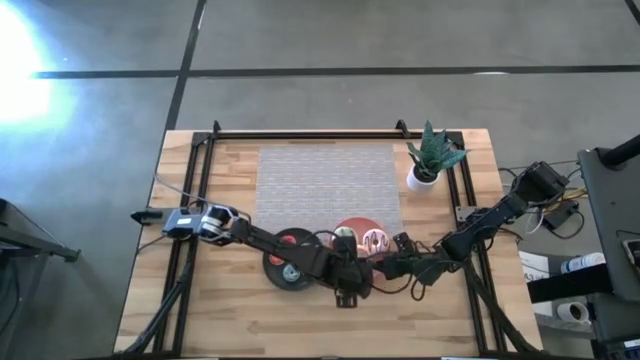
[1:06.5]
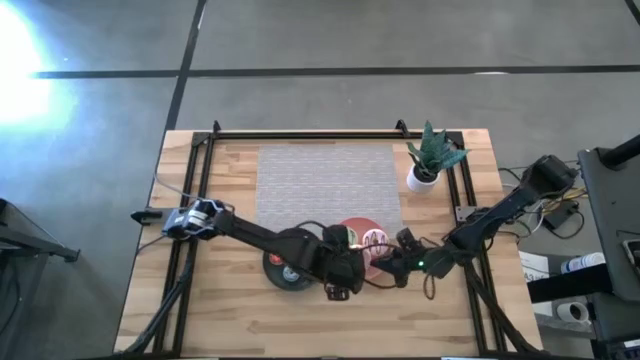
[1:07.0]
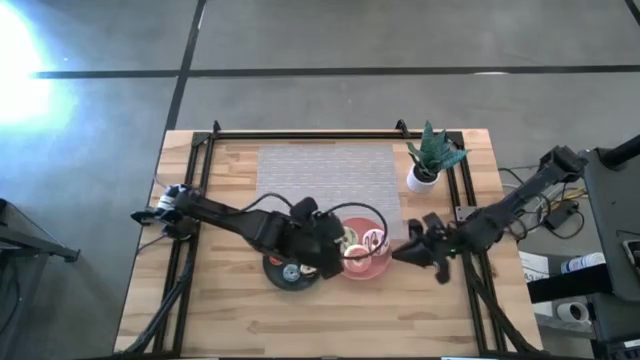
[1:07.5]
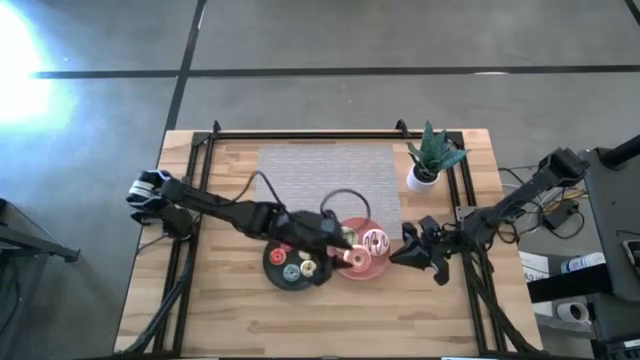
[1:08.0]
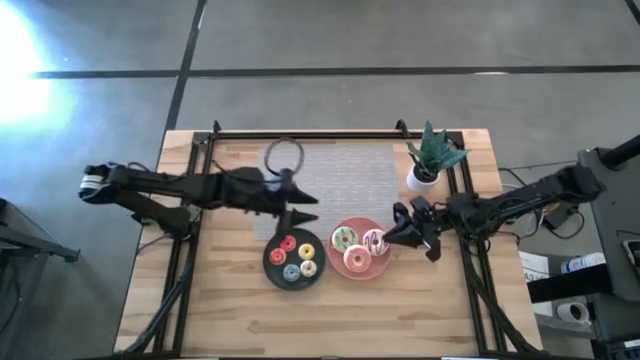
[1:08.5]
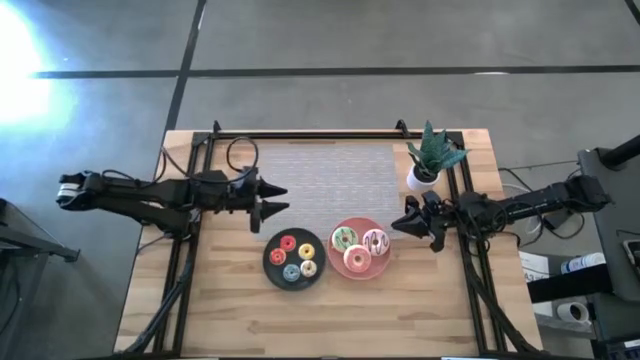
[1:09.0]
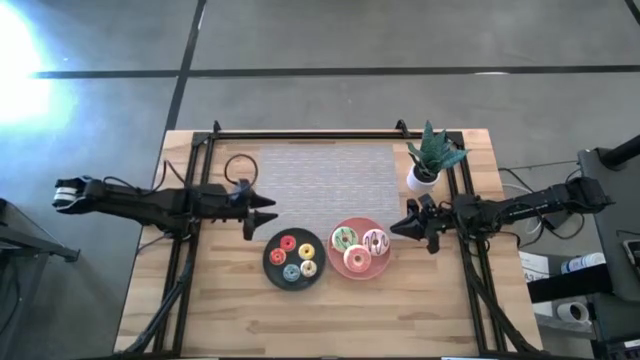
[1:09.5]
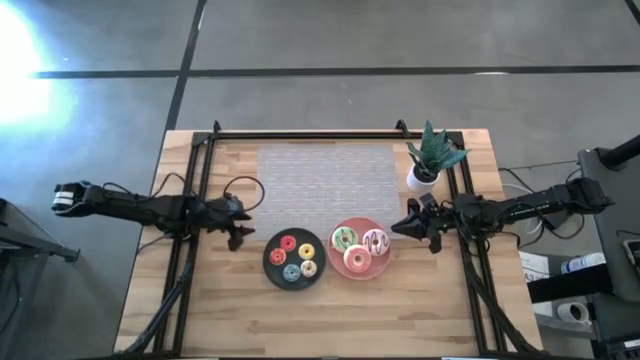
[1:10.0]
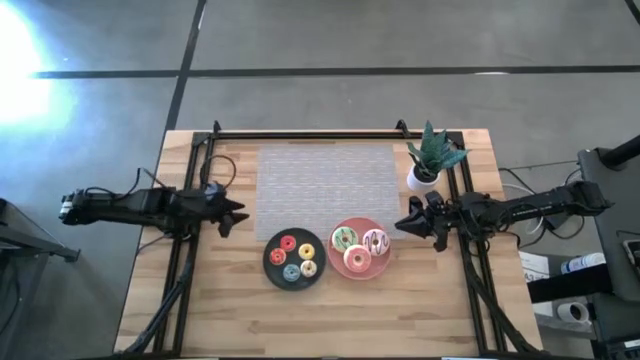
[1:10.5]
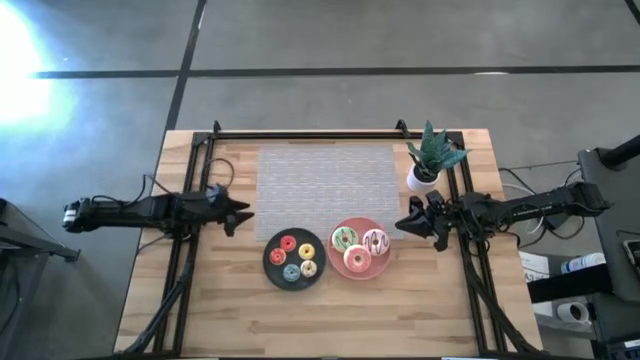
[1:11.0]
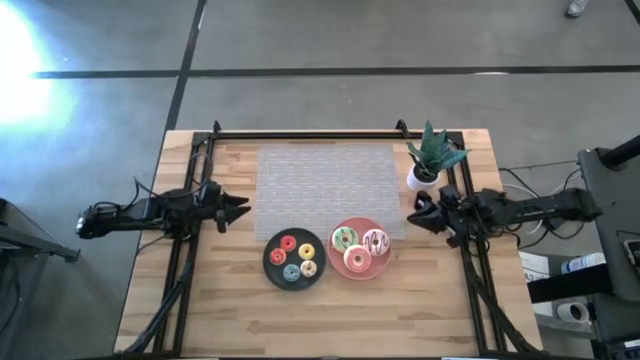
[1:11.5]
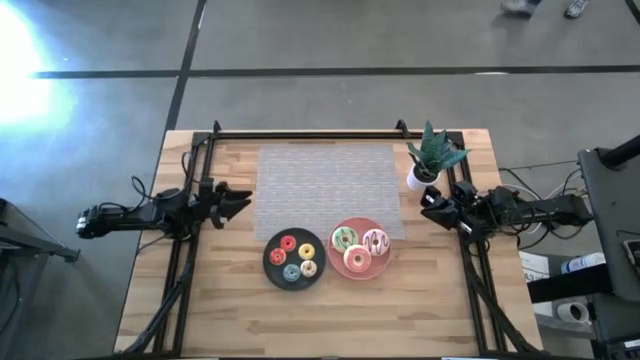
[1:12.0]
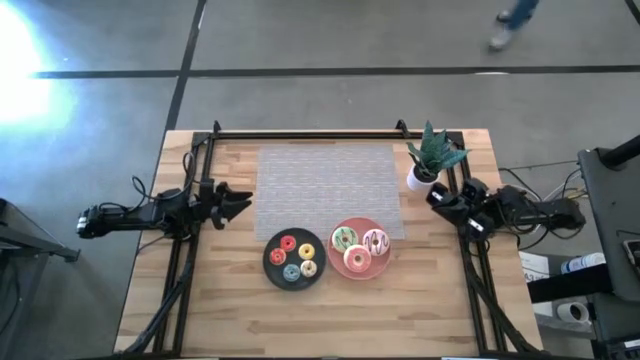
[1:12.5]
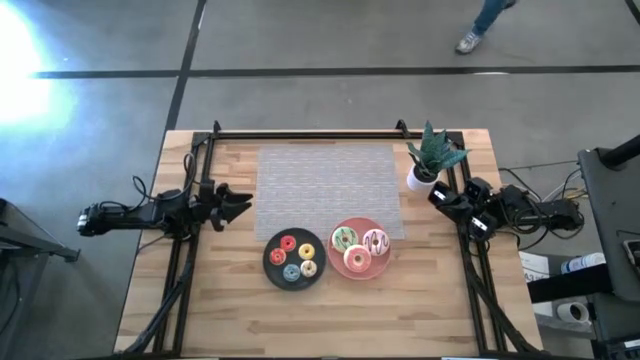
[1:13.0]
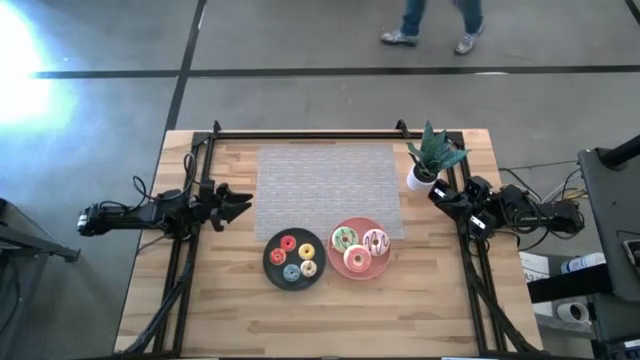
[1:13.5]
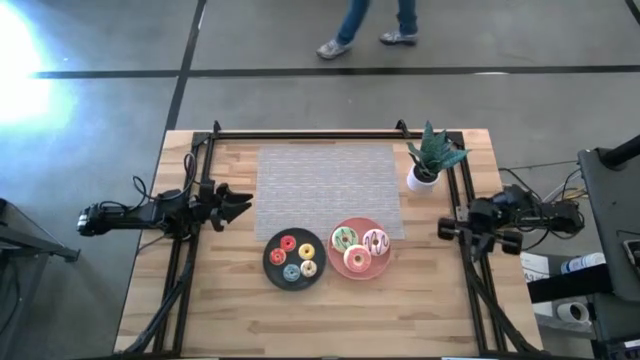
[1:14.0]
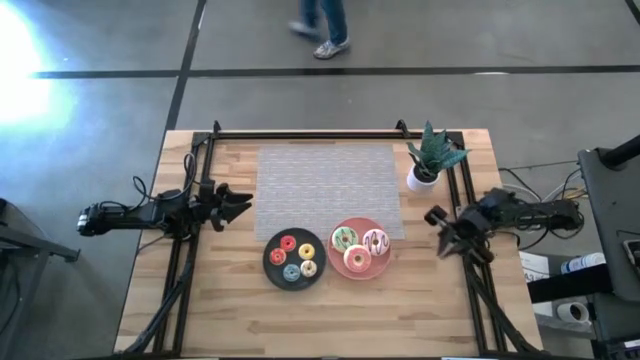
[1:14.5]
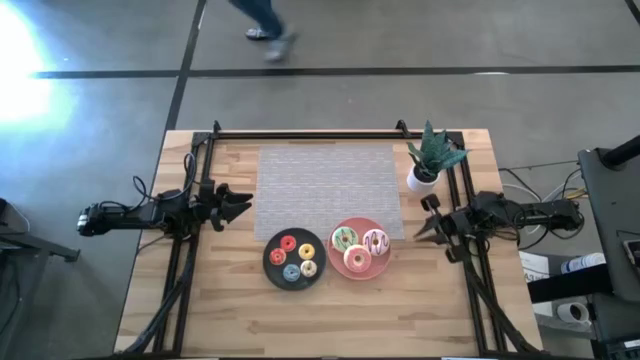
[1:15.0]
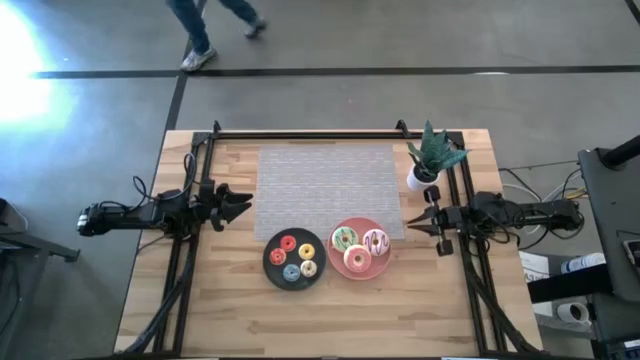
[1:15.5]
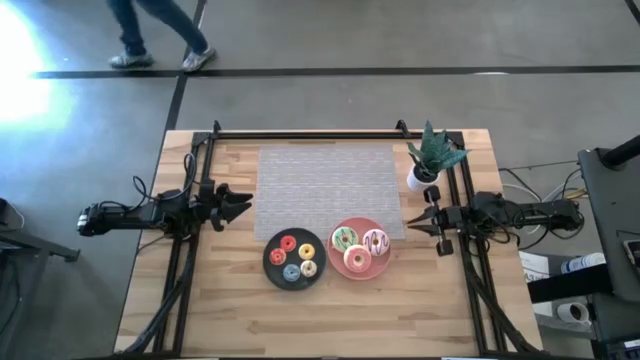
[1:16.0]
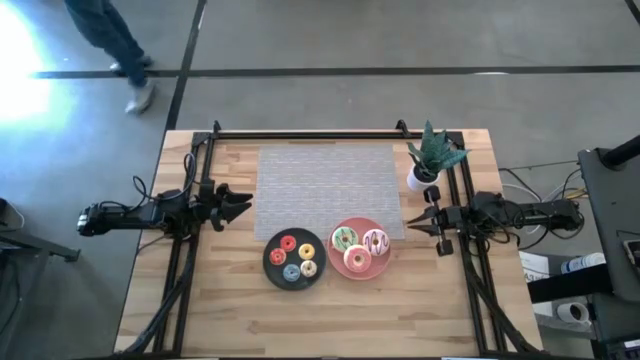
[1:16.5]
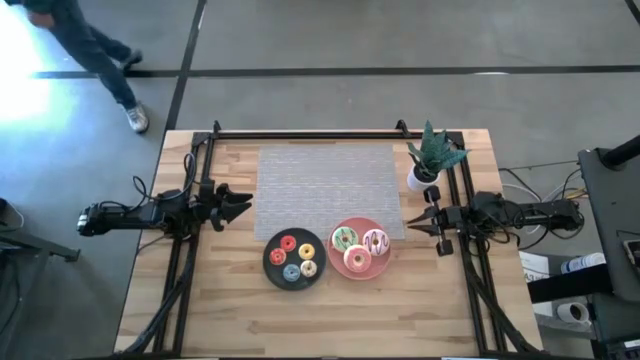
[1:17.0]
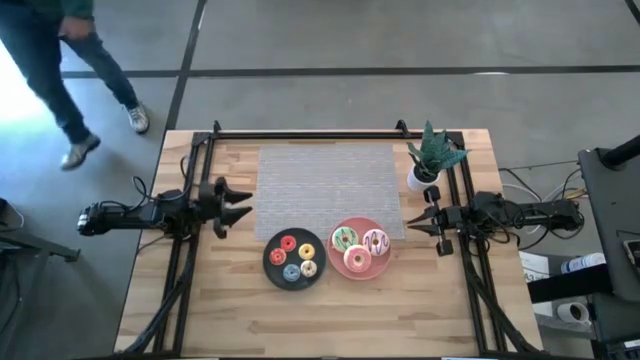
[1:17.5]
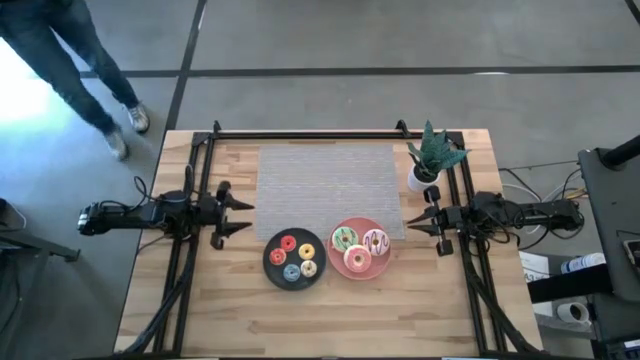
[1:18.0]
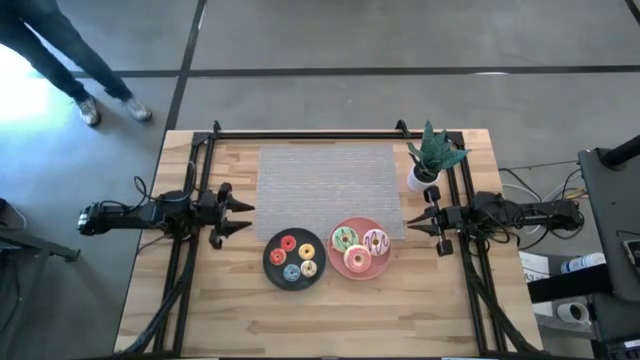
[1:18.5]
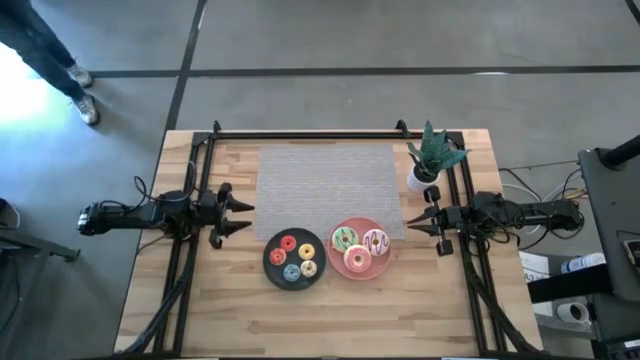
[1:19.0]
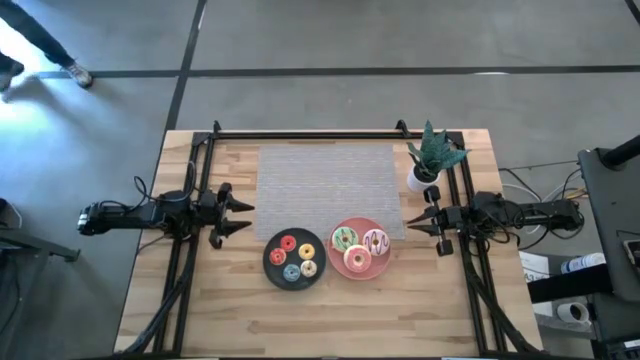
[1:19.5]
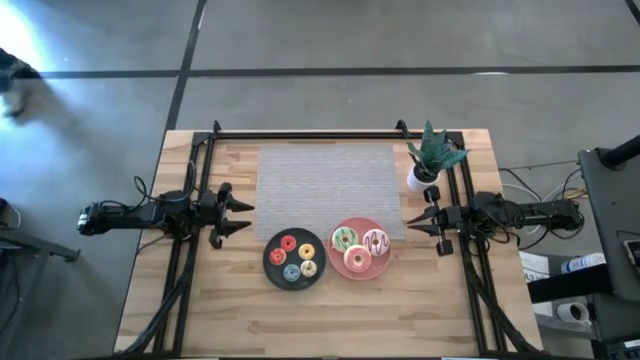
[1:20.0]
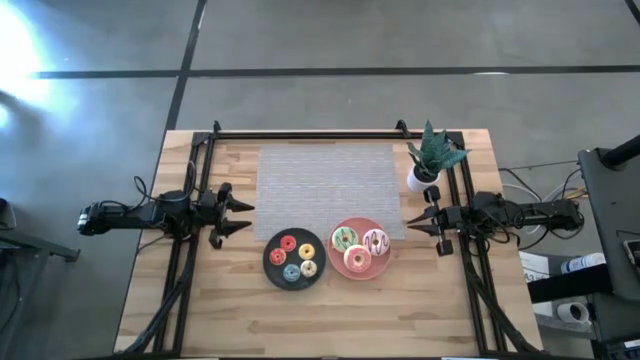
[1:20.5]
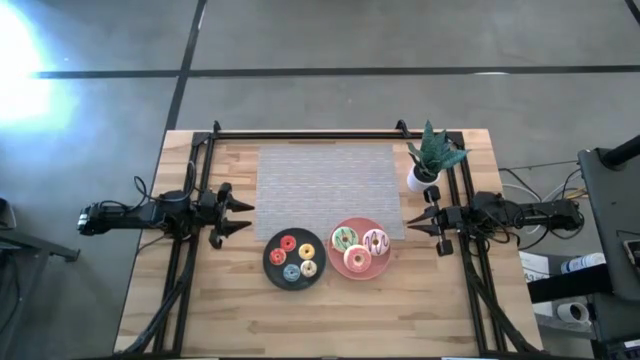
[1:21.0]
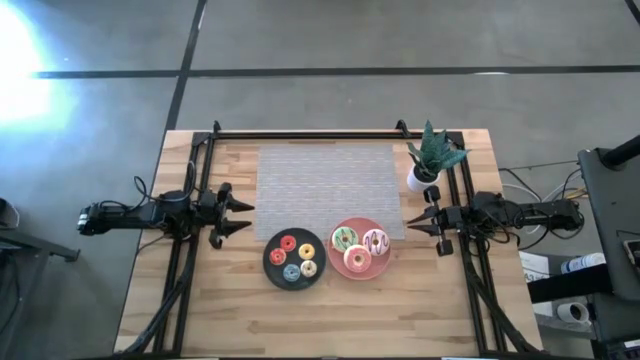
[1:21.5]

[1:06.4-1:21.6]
Task: Pick & Place donuts
Return to Home Position

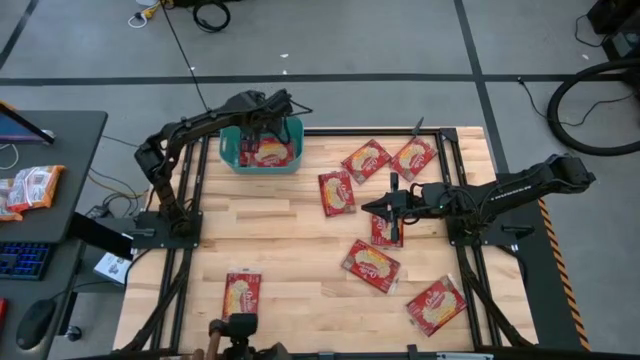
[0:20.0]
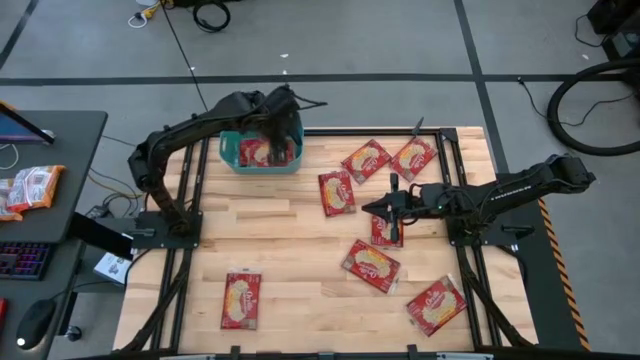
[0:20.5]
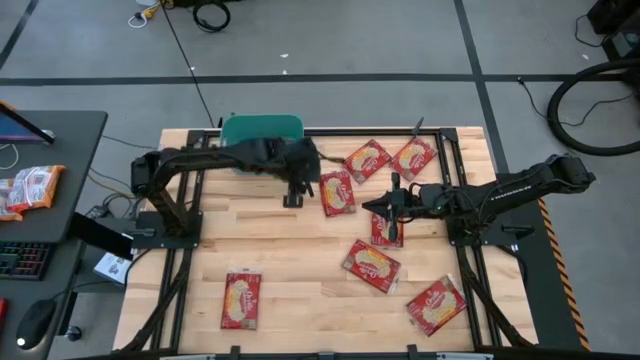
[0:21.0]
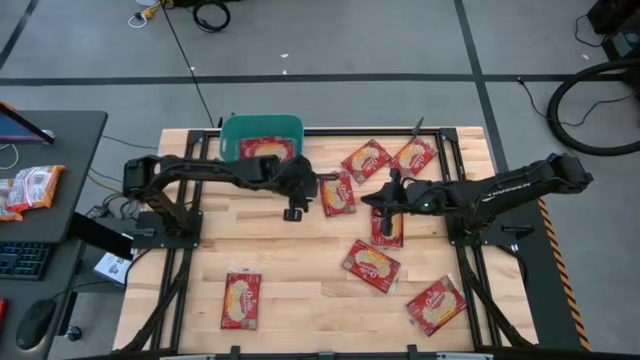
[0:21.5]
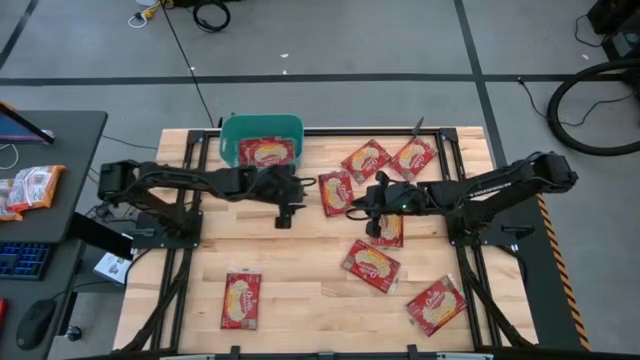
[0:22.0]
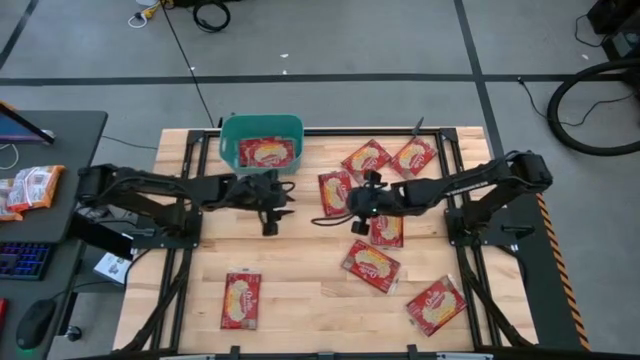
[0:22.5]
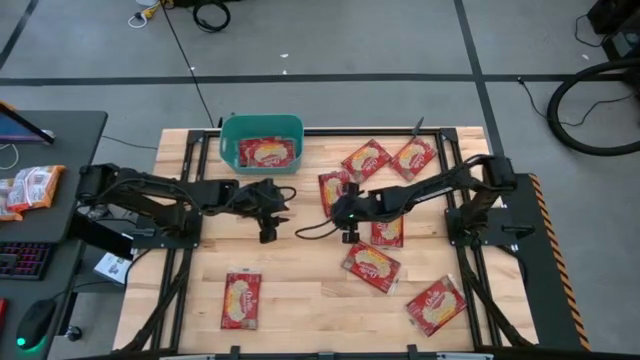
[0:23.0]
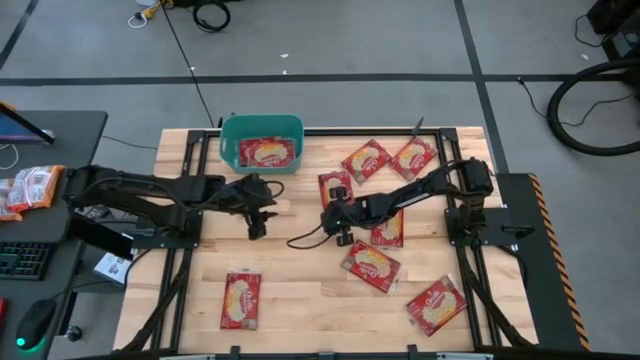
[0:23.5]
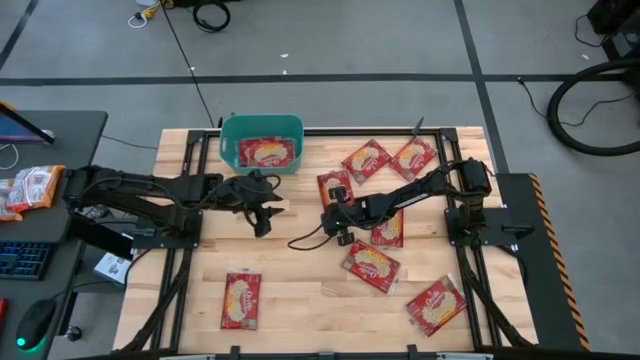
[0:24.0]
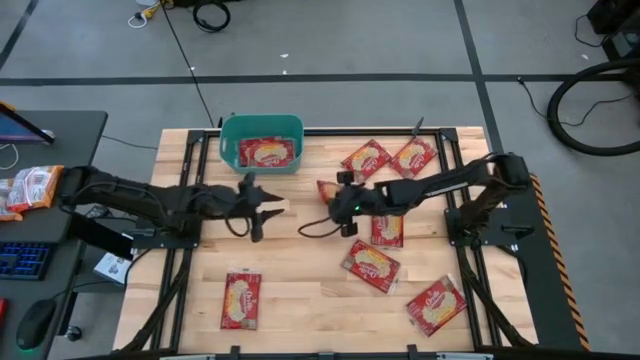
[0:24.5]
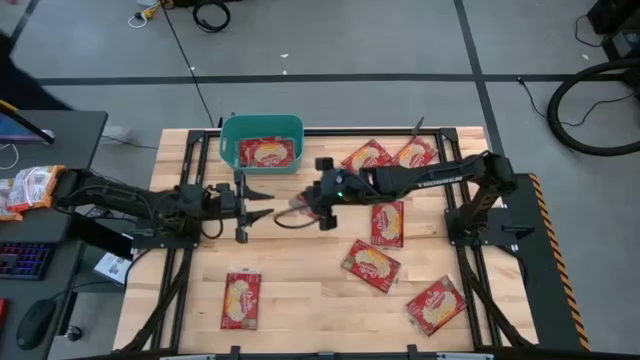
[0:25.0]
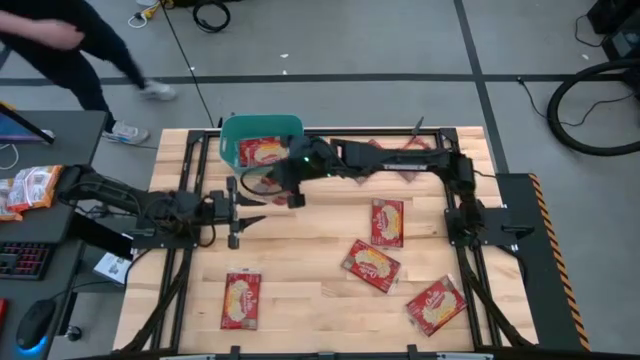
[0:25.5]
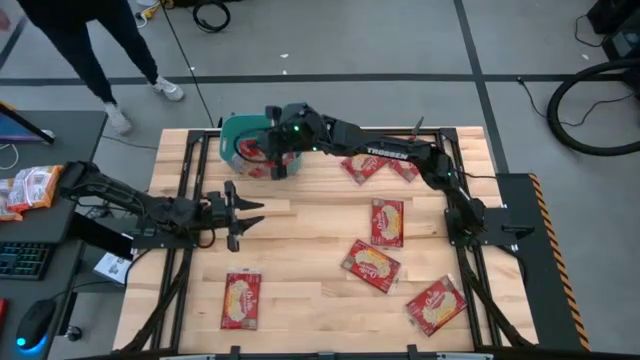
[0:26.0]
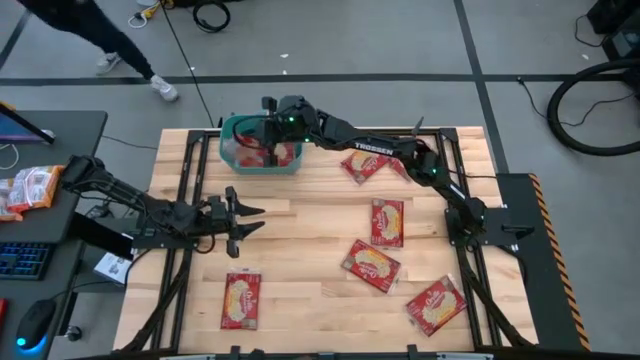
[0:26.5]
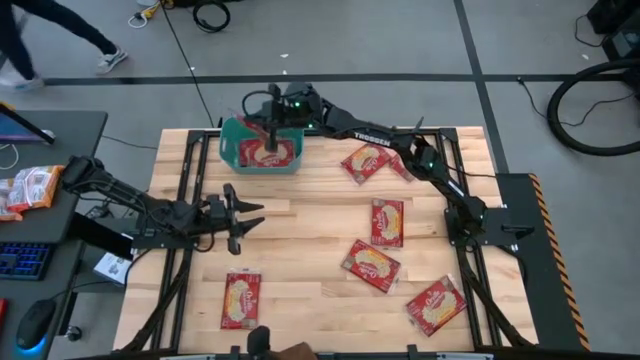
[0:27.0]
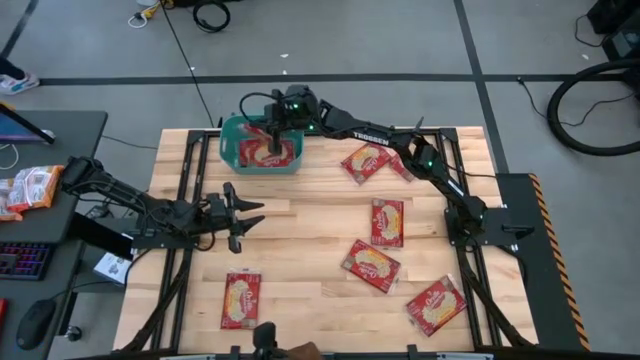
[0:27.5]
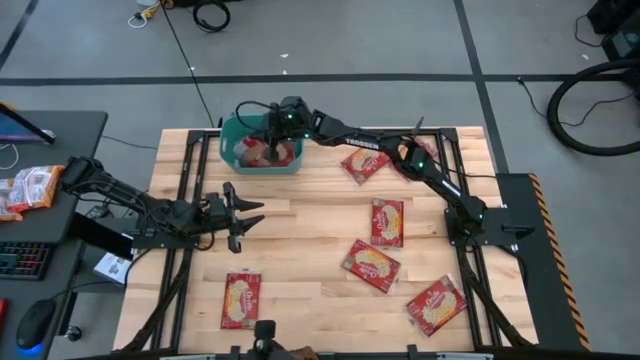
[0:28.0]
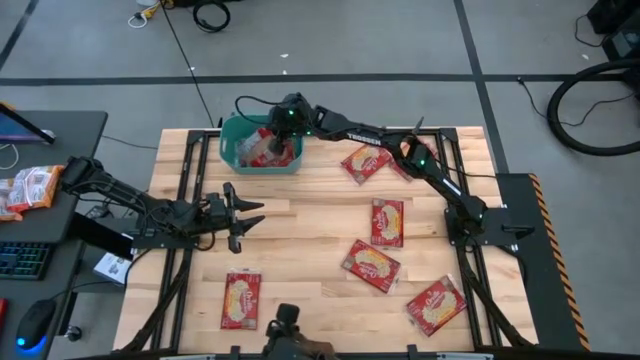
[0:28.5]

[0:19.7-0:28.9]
Task: Sort popcorn bags into baskets
Put the popcorn bag into the blue bin
